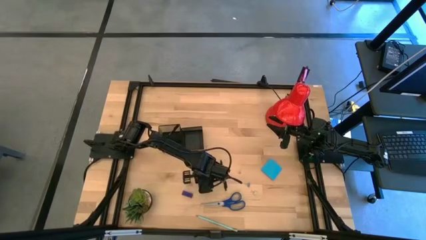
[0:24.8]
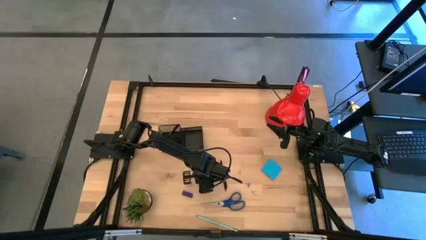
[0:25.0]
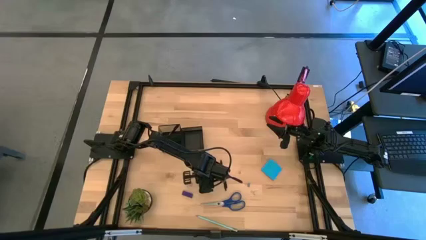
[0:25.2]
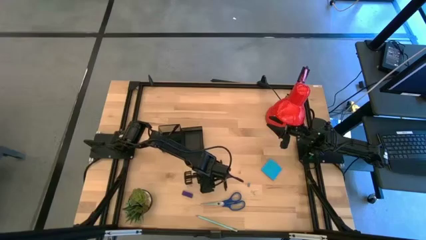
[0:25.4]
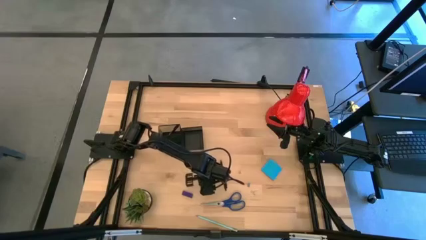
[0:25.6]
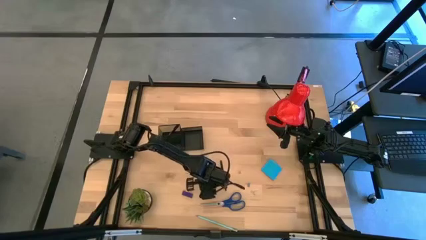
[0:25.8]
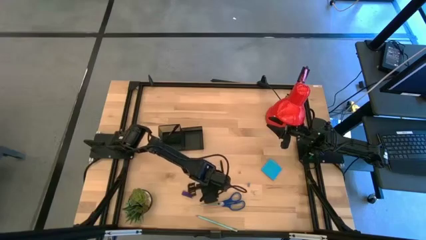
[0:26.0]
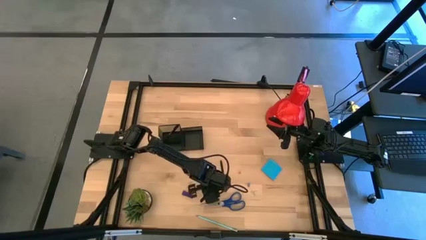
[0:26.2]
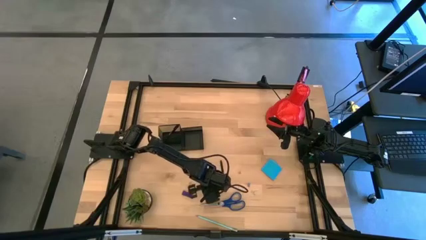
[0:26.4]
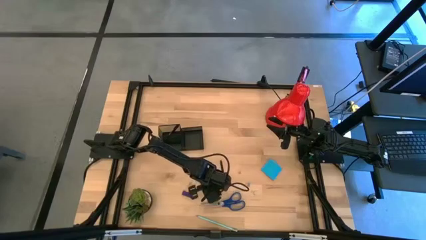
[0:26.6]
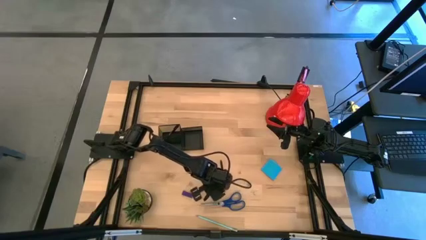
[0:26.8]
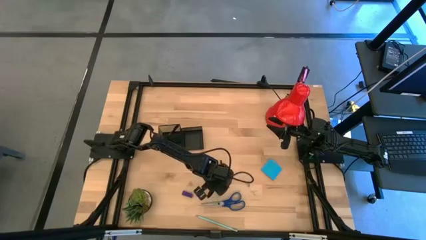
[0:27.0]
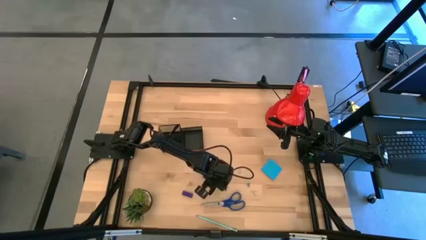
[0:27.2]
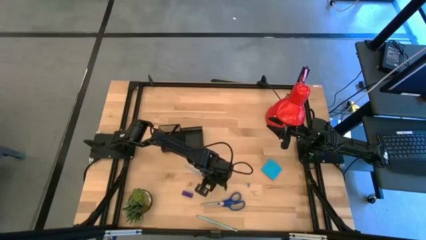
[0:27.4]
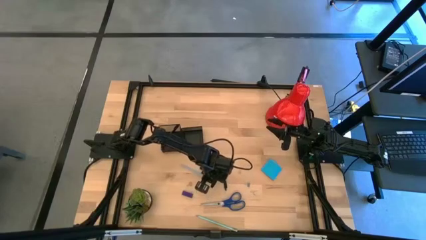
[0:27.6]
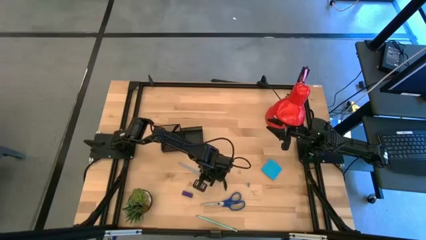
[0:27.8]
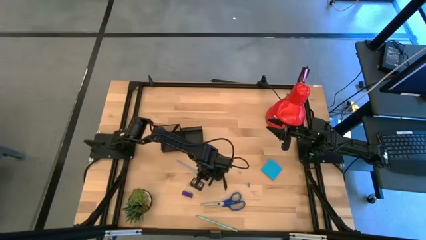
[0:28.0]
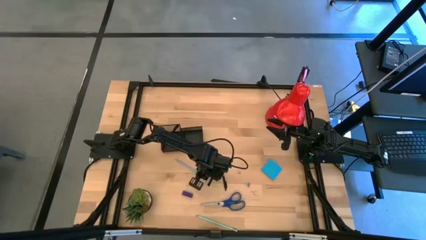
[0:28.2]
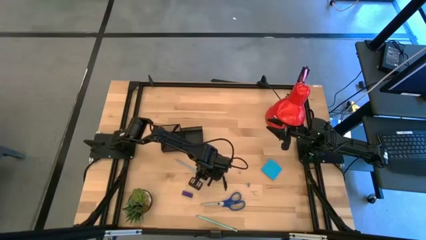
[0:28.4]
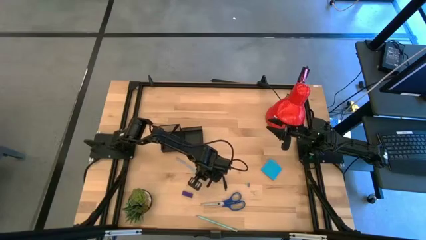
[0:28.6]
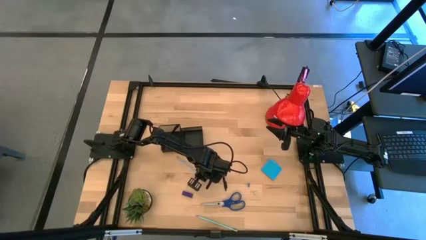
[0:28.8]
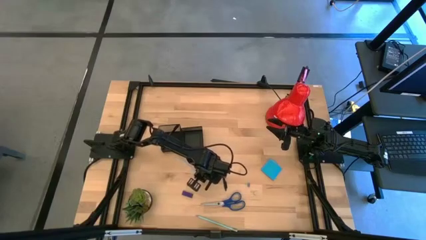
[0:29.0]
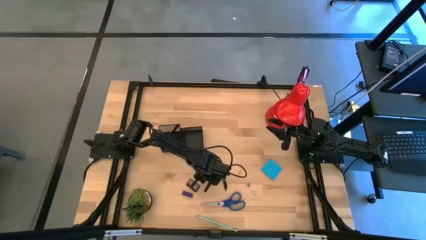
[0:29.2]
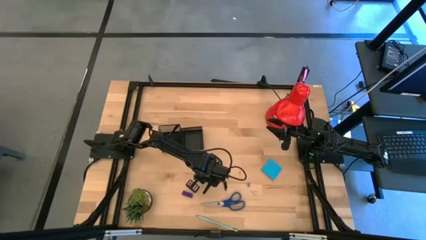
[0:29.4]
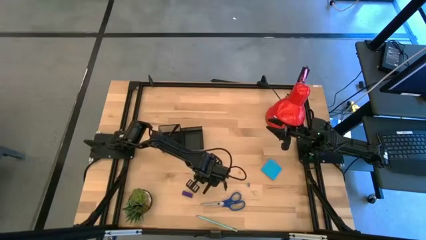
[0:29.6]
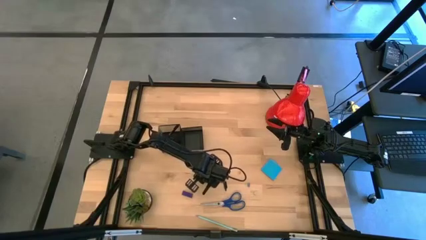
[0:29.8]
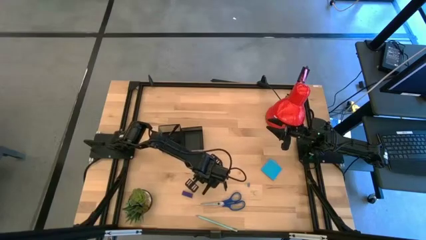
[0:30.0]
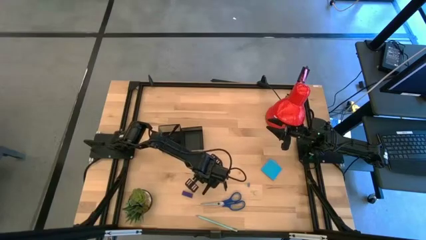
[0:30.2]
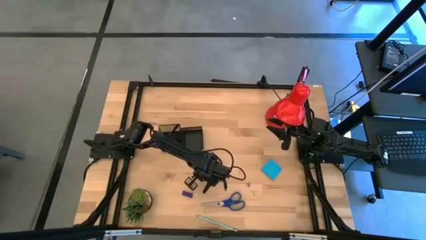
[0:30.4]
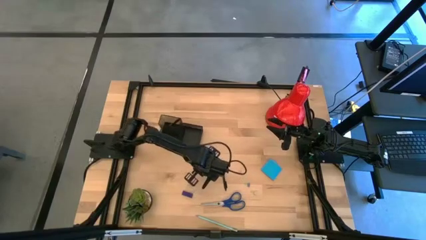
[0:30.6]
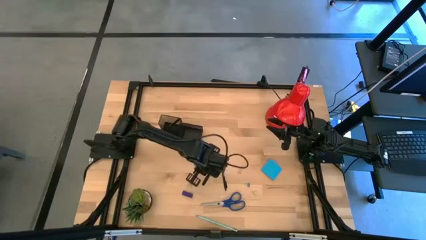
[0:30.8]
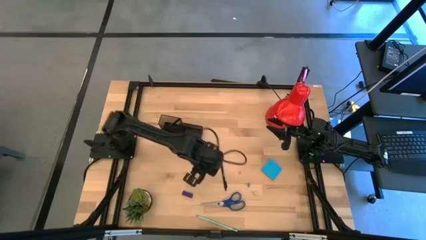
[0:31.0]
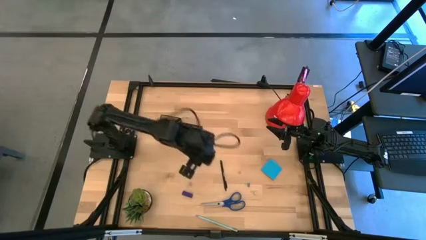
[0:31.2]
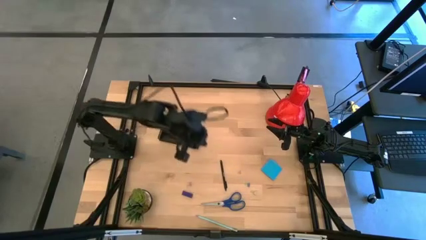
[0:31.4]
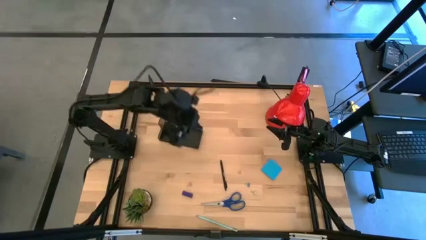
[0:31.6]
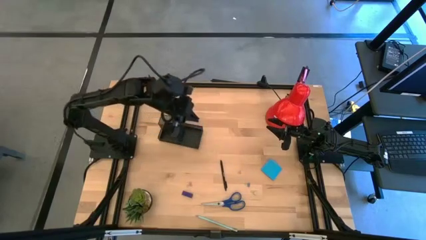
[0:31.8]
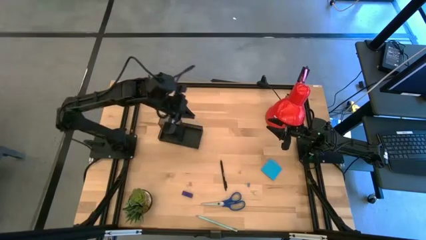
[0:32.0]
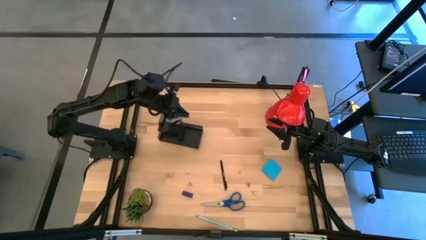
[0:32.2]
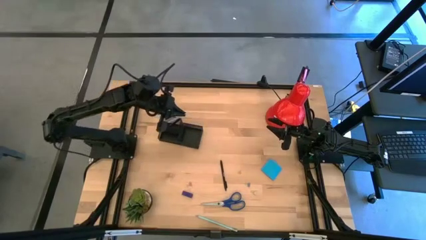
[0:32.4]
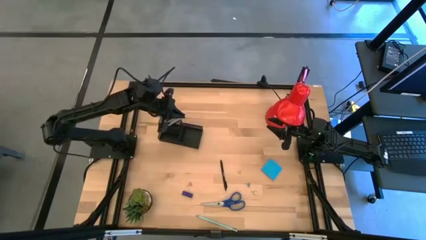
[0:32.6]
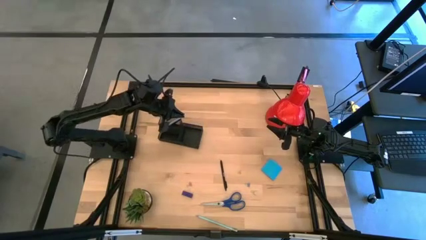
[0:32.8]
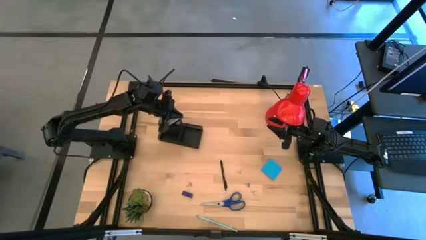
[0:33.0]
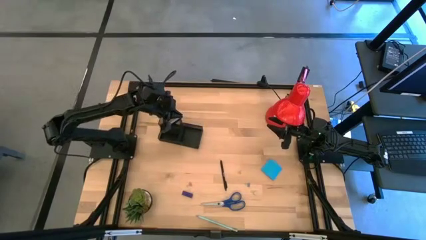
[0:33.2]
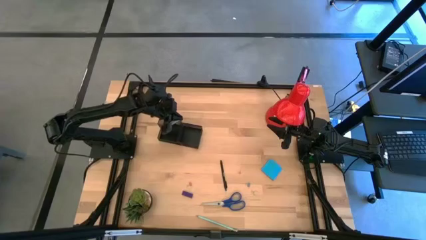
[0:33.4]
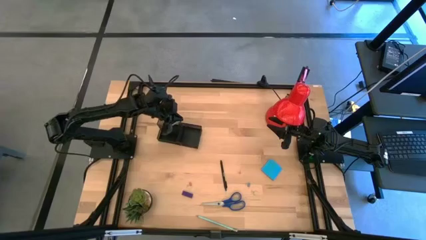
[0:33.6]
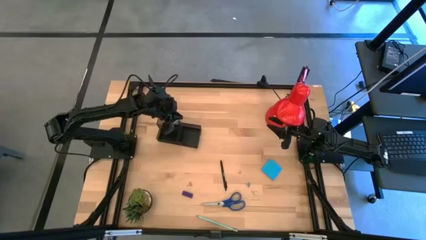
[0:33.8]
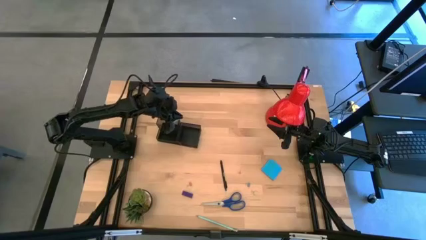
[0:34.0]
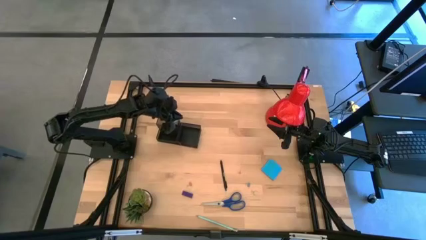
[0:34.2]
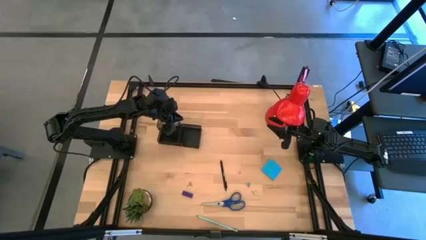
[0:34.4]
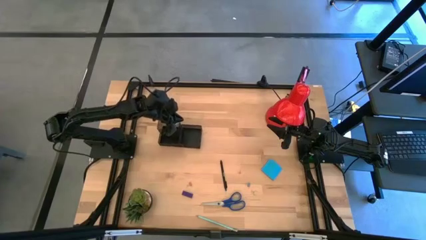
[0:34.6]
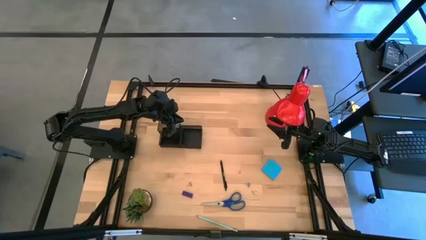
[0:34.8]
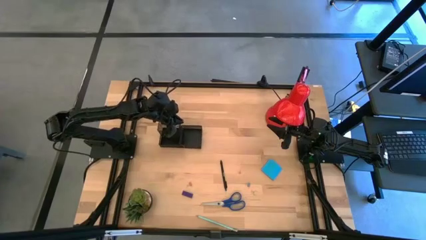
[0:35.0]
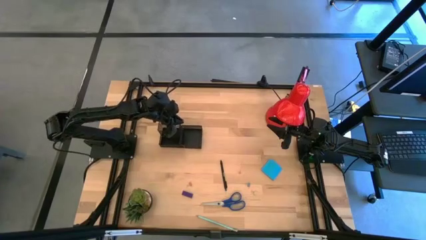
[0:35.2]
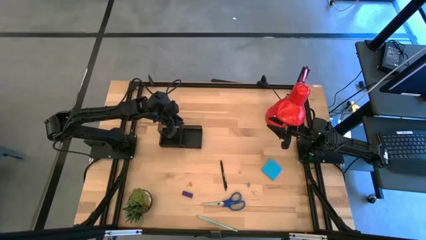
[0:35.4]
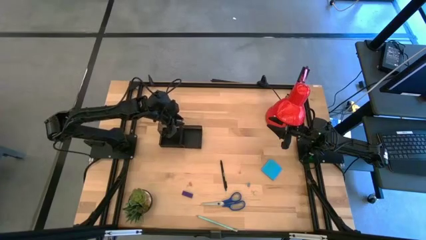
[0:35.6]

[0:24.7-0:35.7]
Task: Pick and place office supplies into organizer
Put the top blue pencil into the black desk organizer
